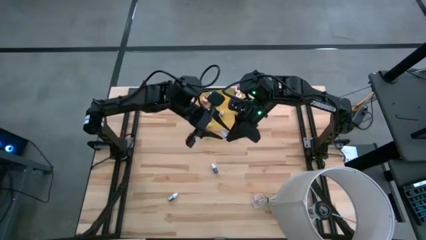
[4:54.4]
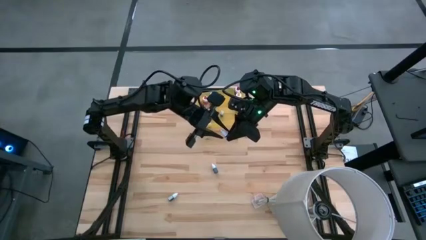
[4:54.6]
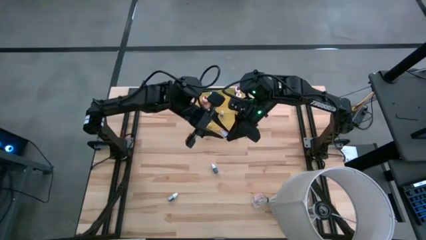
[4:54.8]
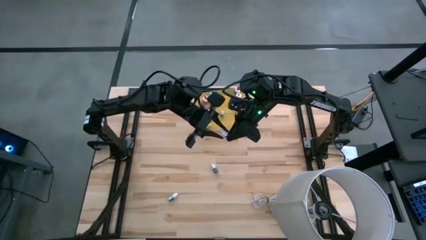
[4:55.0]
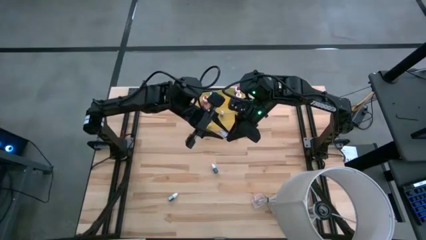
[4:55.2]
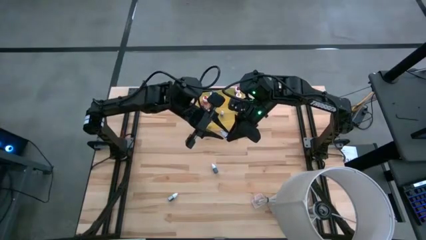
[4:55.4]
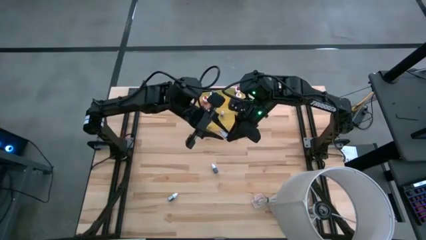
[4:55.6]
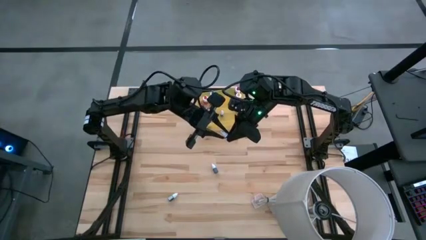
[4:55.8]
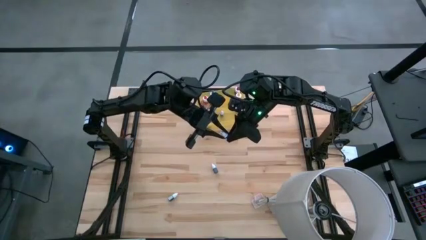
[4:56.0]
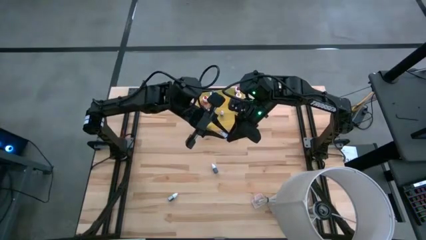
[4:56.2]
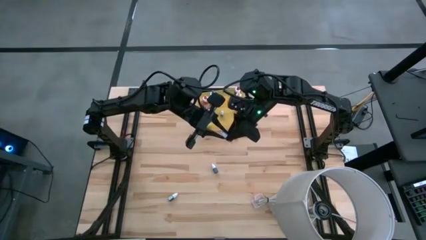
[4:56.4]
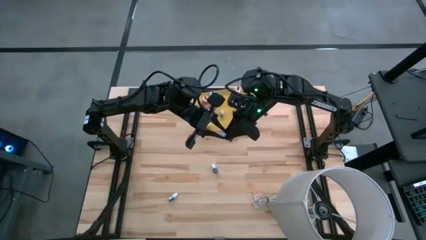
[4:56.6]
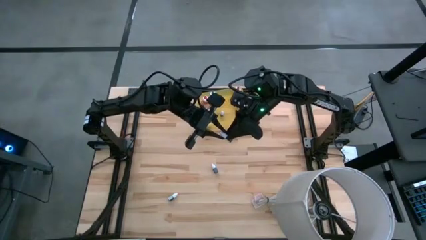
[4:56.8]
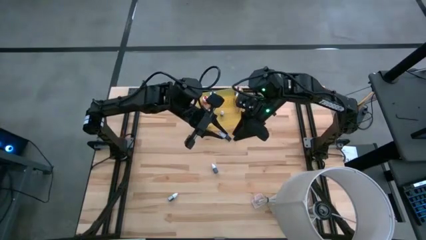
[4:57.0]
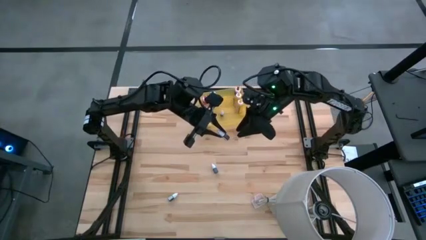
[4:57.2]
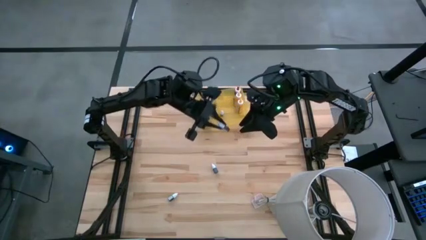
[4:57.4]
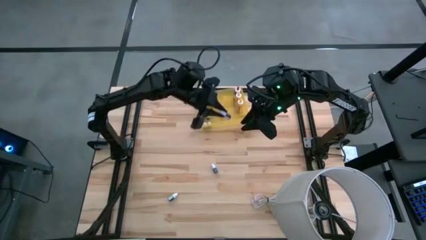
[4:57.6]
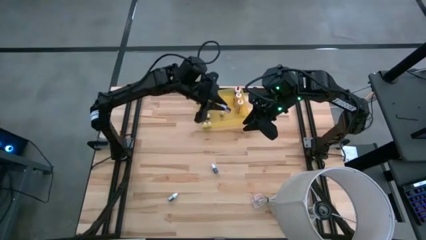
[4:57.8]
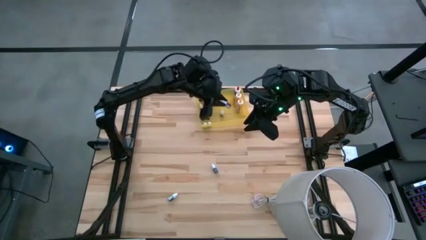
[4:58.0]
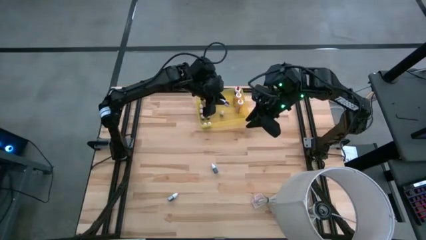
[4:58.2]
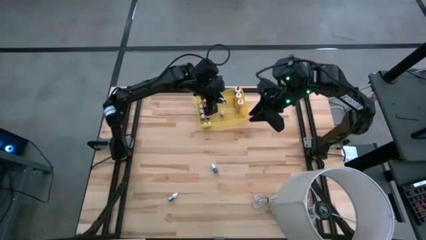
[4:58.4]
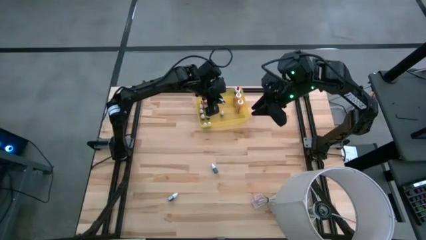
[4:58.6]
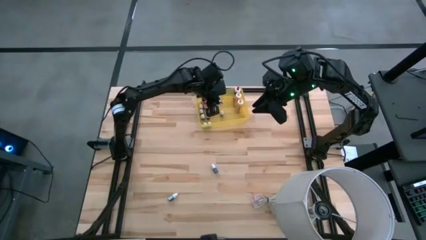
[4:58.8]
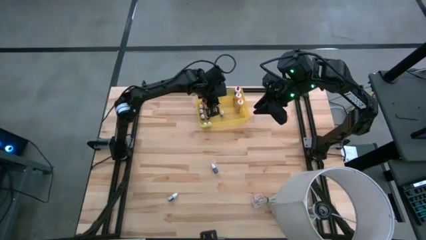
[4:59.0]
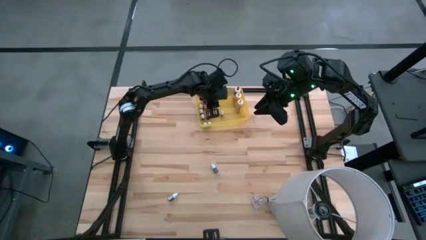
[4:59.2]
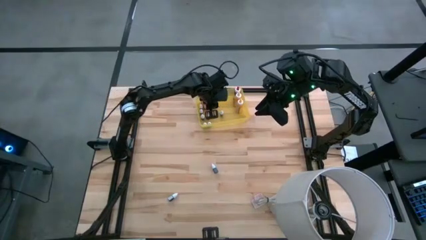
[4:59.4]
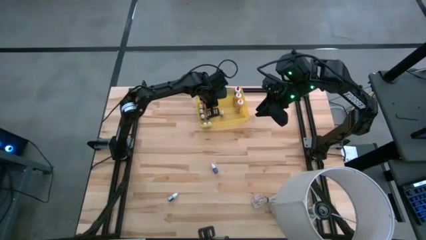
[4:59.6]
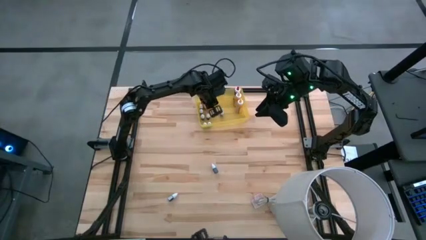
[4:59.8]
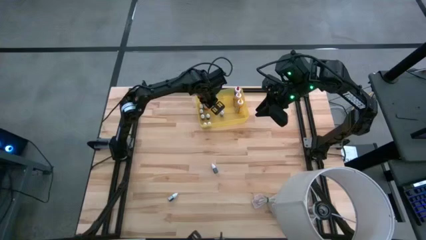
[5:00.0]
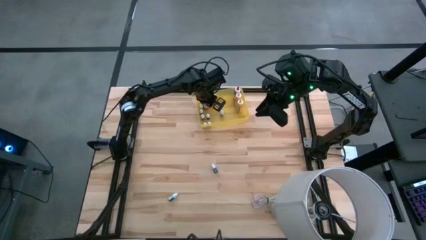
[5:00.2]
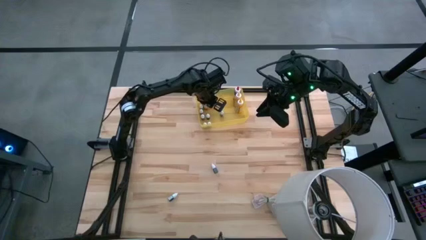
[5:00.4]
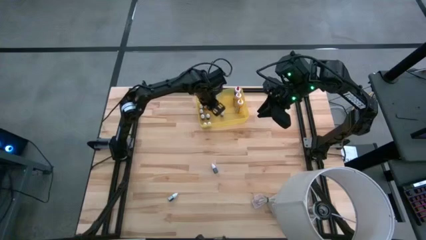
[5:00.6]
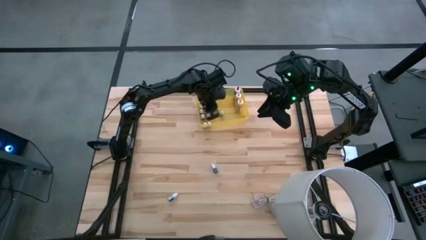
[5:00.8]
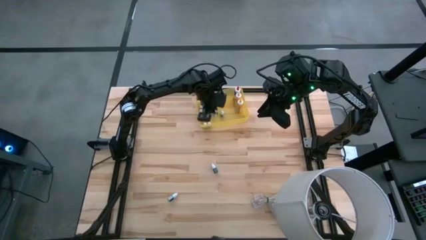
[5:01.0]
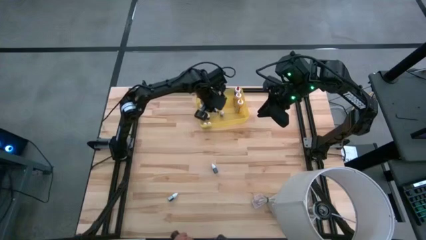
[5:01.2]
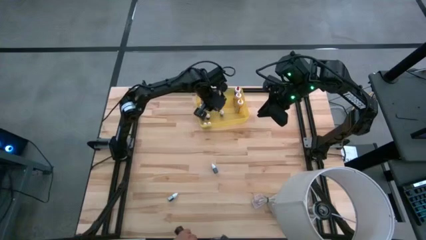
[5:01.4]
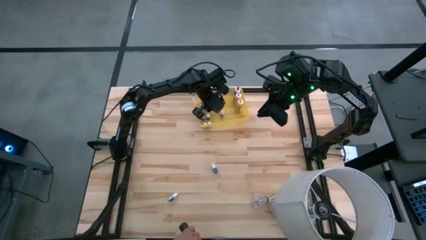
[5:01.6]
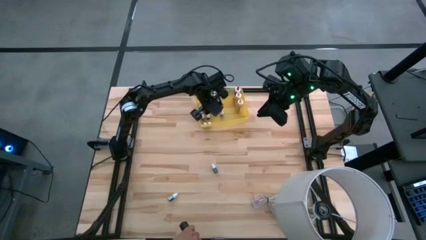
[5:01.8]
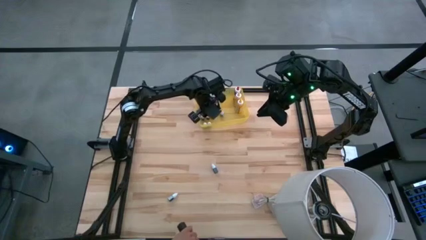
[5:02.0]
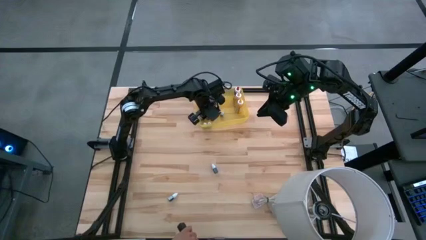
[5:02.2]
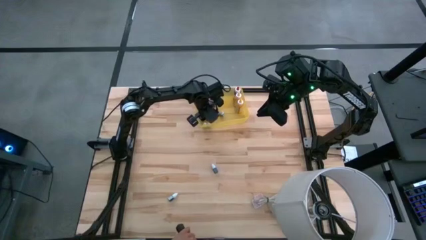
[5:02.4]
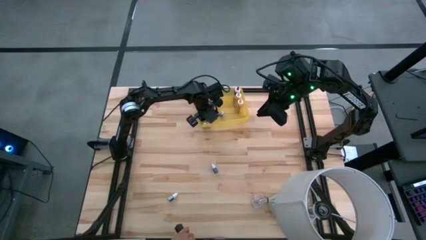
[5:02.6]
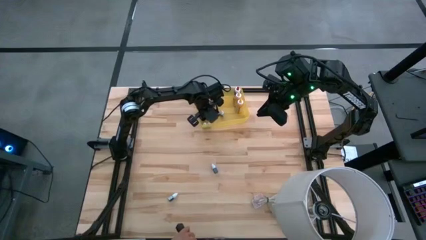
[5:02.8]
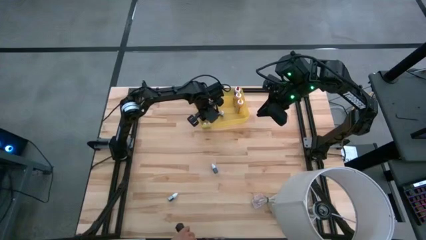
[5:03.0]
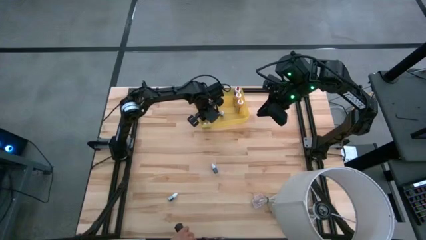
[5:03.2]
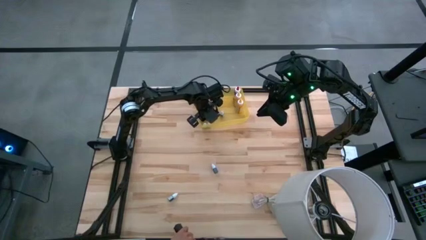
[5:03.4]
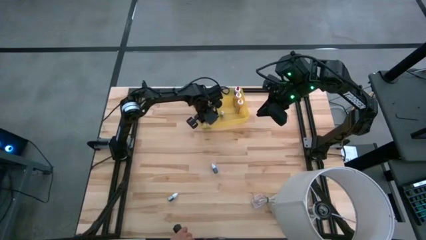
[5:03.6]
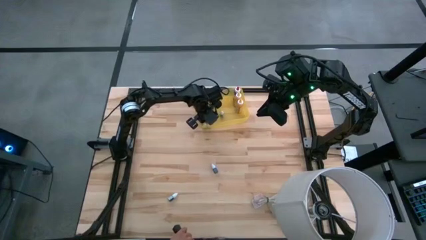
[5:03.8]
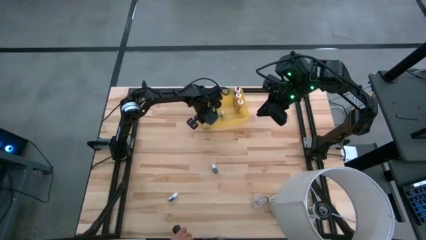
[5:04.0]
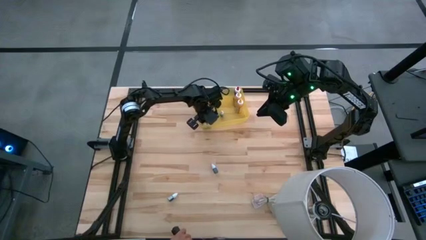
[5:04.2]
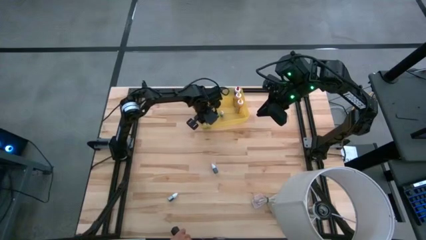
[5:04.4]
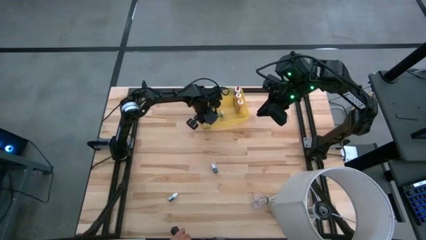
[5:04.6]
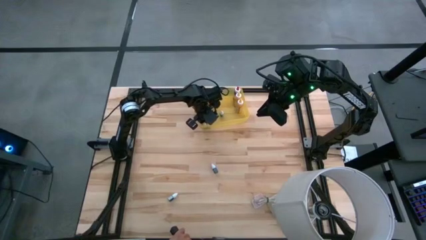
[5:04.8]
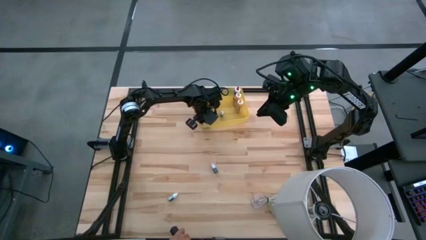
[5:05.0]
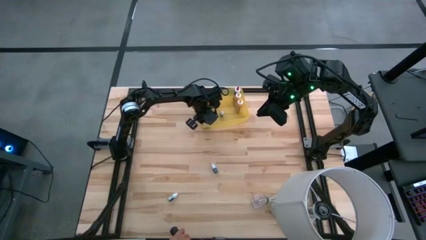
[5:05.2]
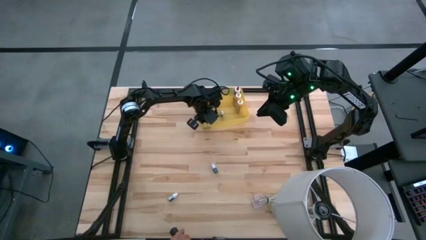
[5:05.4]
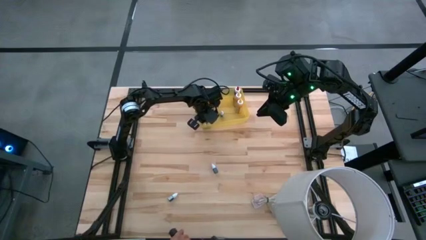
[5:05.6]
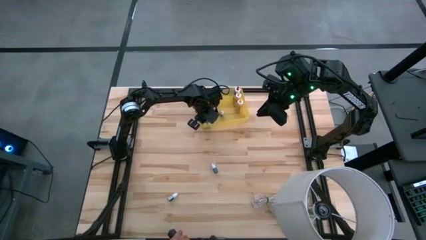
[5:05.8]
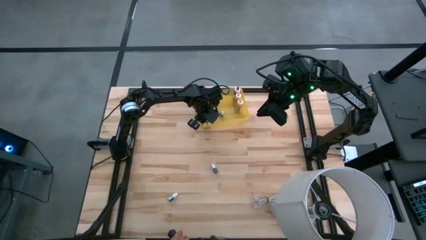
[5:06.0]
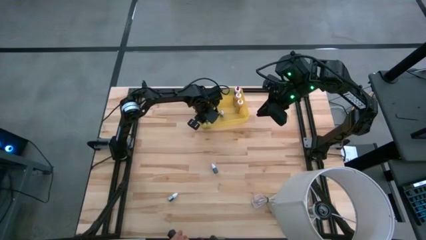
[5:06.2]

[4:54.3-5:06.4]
Task: Pick & Place food coloring
Put the small orange food coloring bottle into the yellow bin
